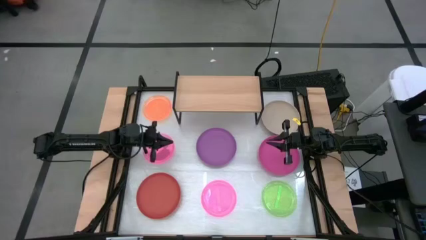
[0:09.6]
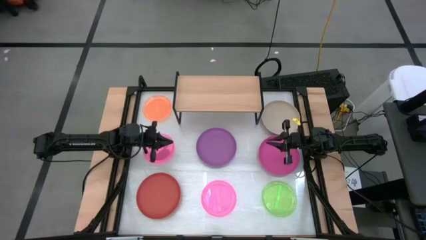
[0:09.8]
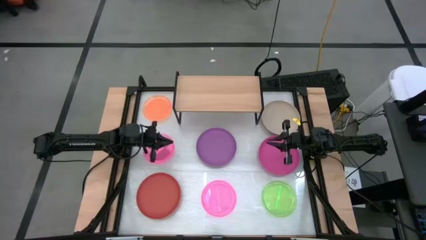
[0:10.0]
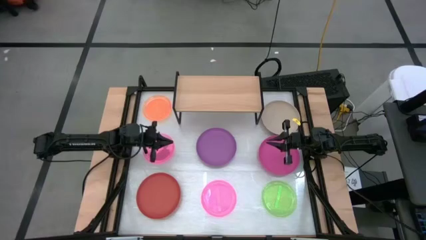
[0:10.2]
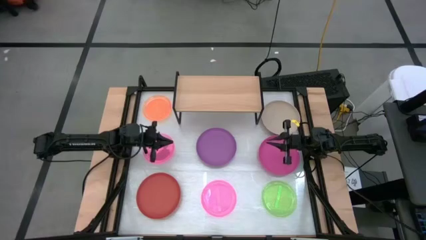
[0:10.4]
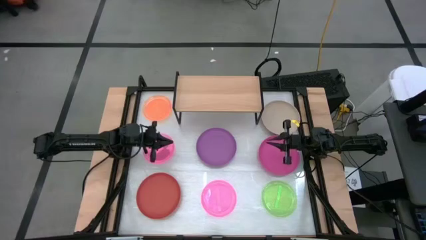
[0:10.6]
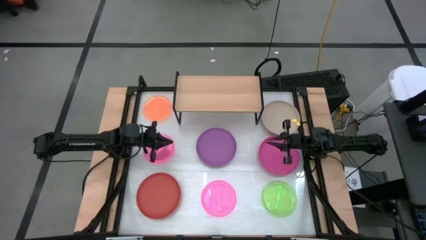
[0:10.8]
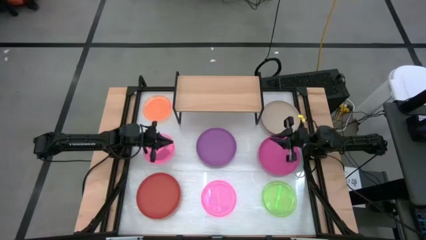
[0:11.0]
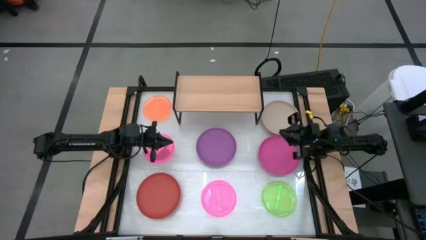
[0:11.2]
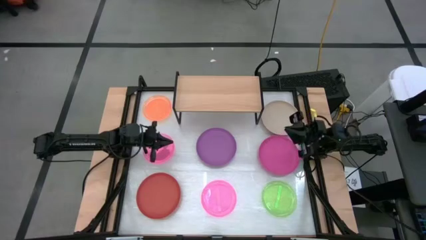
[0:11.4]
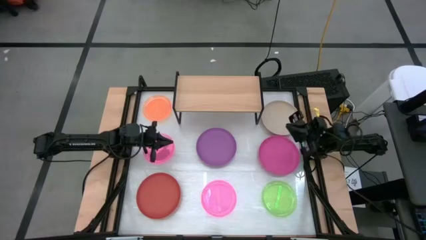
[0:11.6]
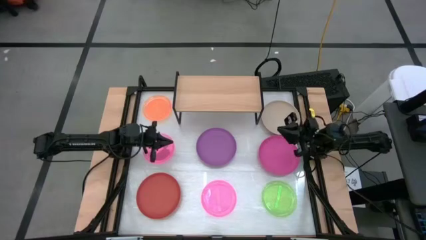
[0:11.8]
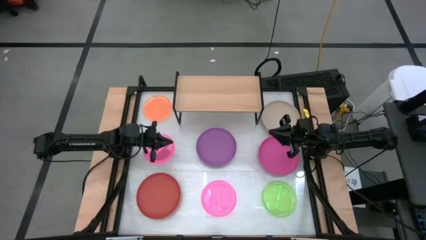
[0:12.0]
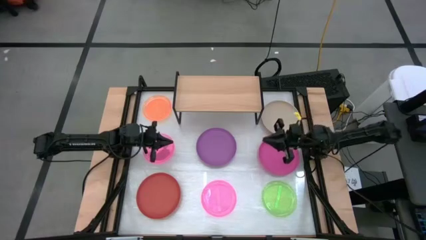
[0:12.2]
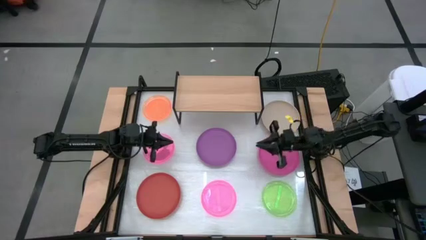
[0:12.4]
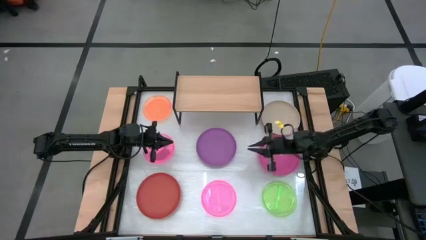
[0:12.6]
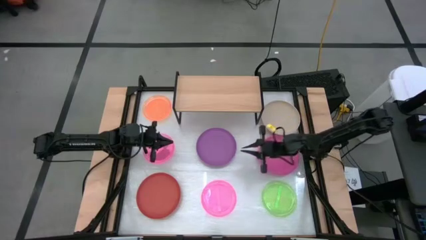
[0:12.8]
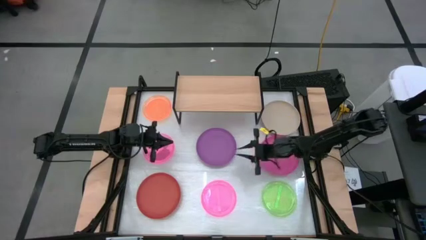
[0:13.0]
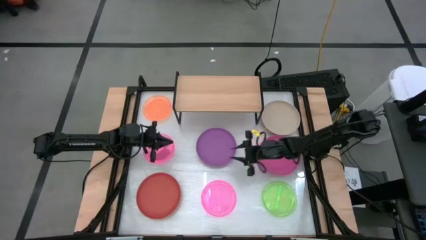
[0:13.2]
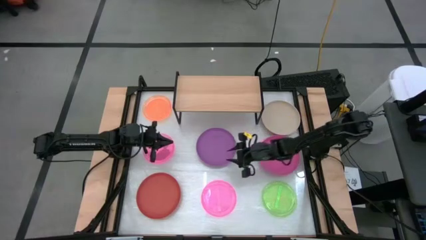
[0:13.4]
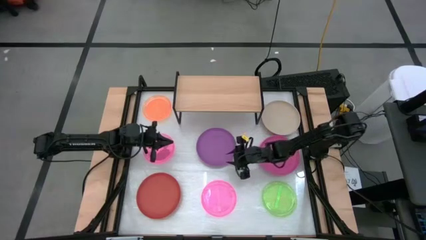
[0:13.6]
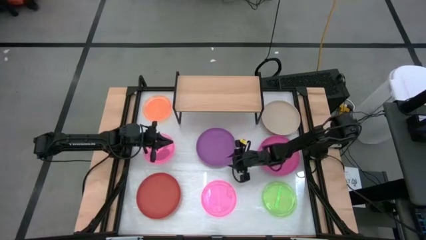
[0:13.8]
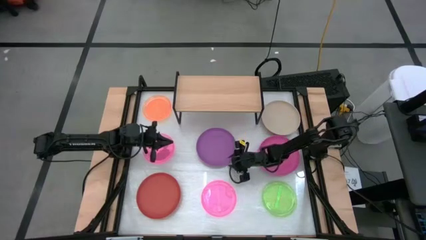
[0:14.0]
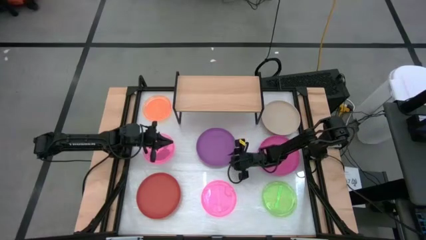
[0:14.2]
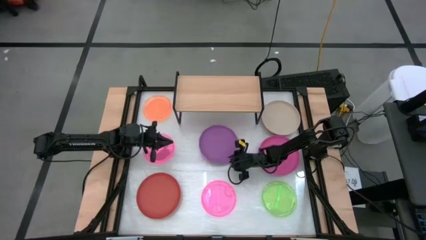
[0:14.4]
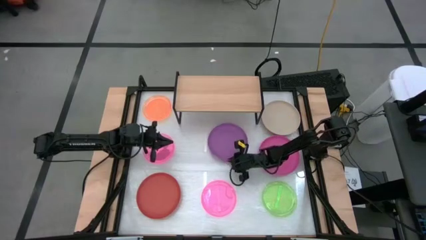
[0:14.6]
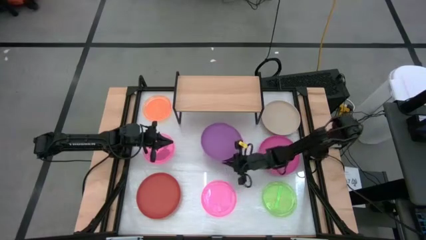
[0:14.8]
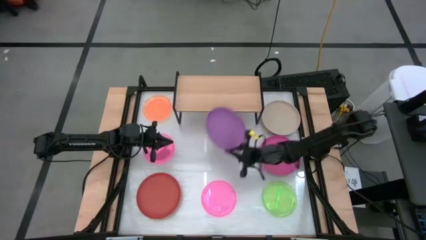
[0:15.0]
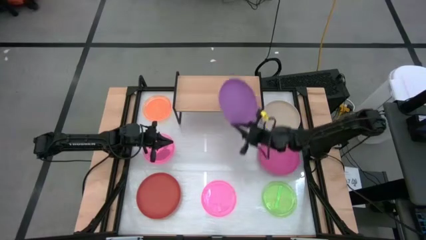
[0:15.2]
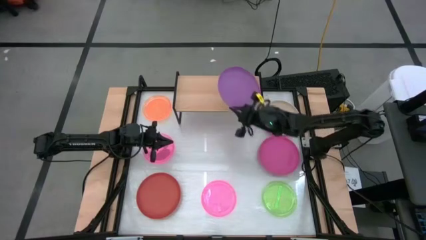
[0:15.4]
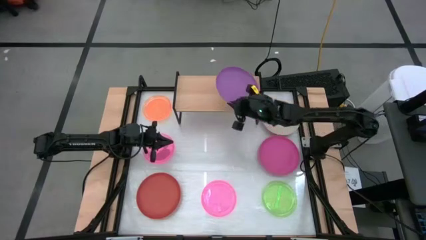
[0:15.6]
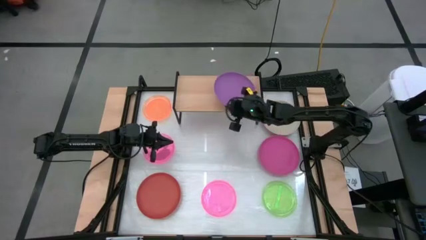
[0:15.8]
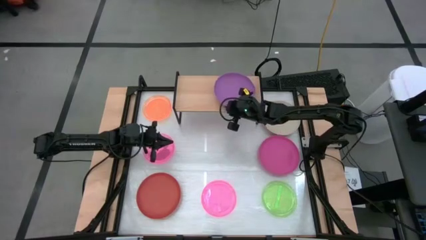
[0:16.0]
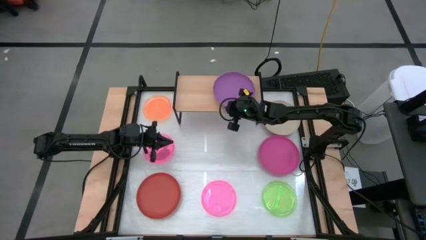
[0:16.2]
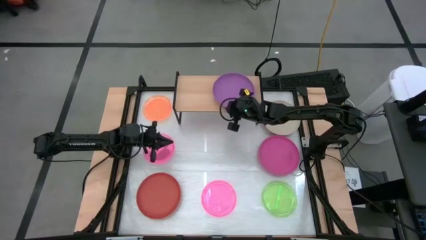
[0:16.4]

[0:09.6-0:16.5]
Task: Place and stack plates onto a shelf
Put the violet plate on the shelf

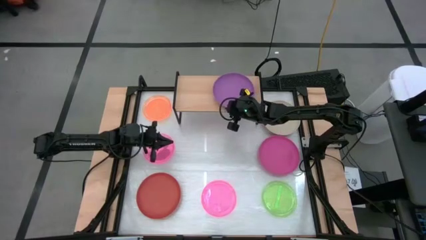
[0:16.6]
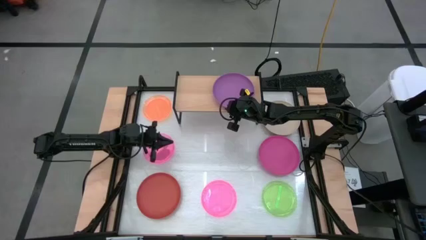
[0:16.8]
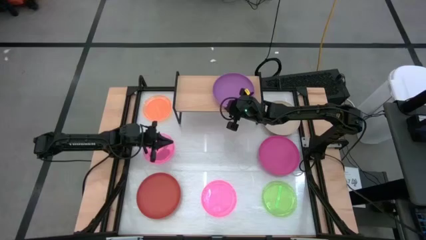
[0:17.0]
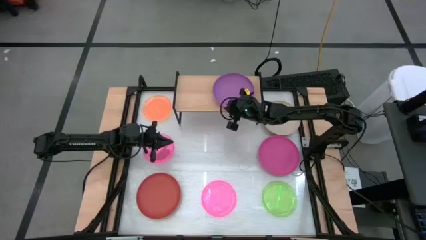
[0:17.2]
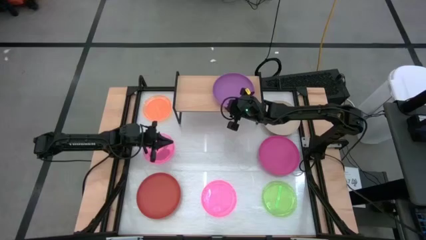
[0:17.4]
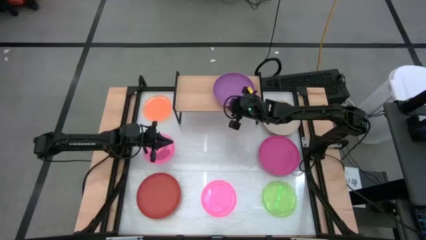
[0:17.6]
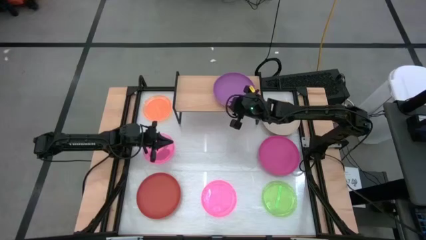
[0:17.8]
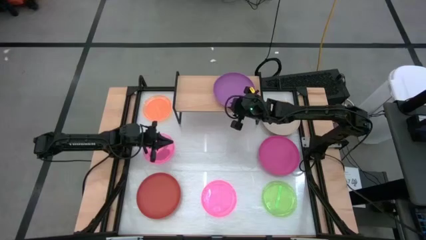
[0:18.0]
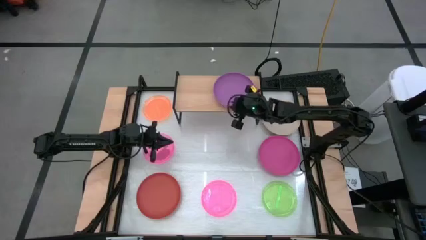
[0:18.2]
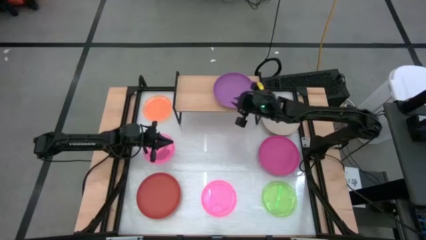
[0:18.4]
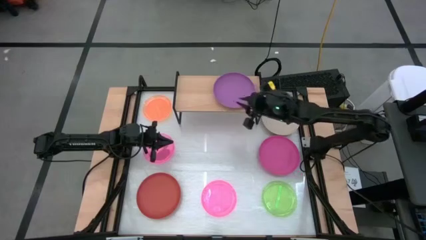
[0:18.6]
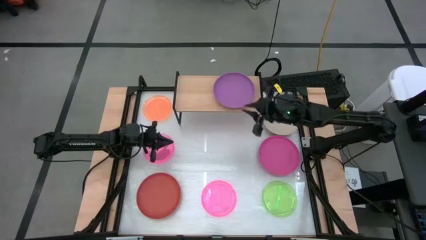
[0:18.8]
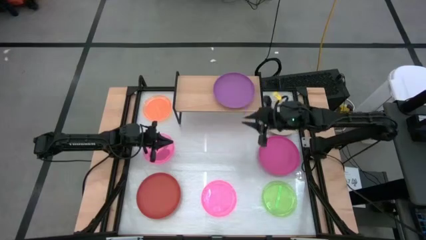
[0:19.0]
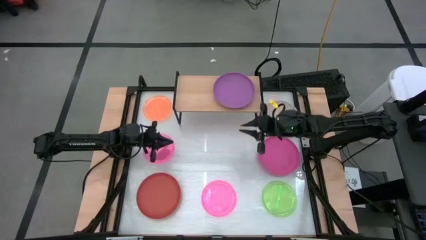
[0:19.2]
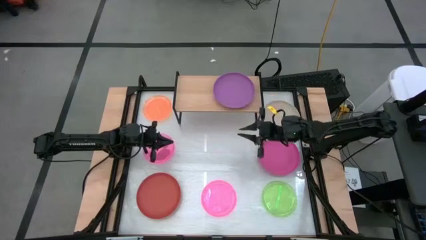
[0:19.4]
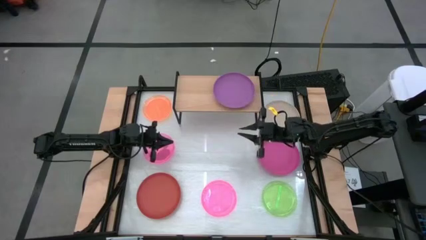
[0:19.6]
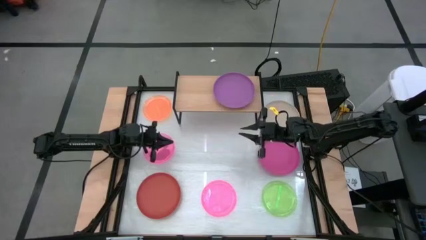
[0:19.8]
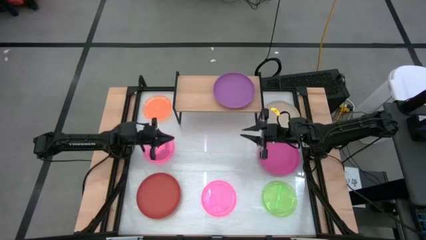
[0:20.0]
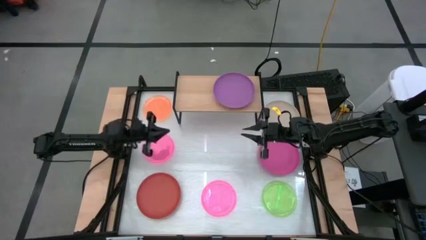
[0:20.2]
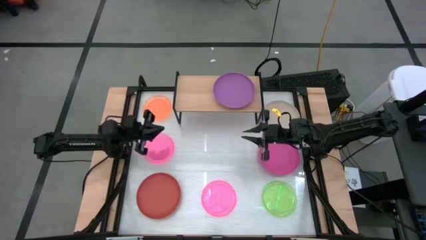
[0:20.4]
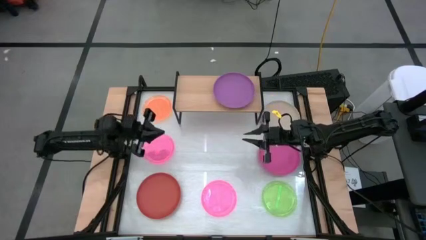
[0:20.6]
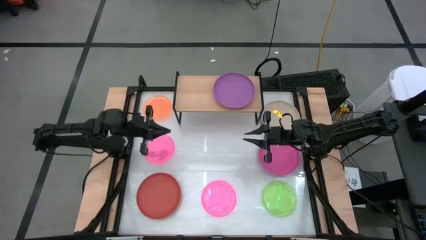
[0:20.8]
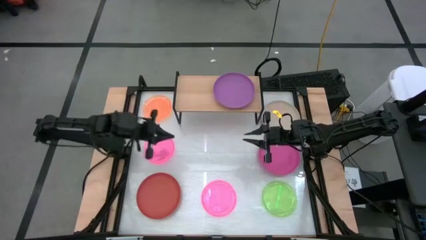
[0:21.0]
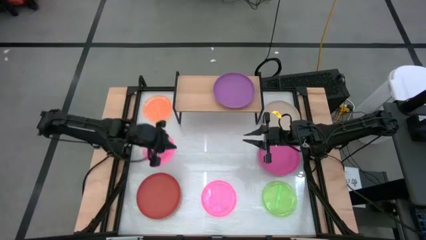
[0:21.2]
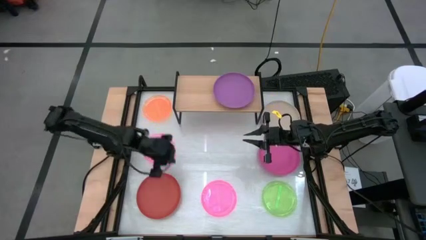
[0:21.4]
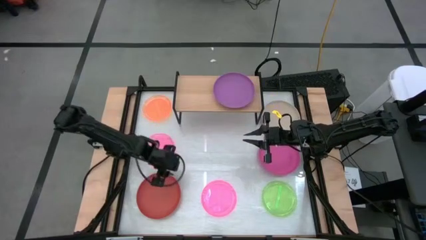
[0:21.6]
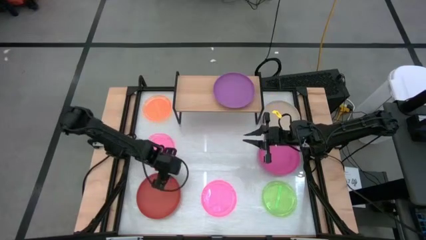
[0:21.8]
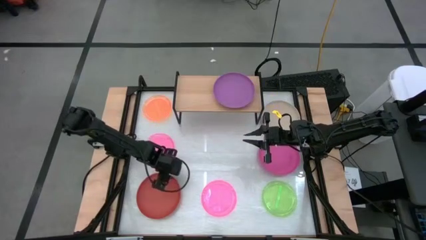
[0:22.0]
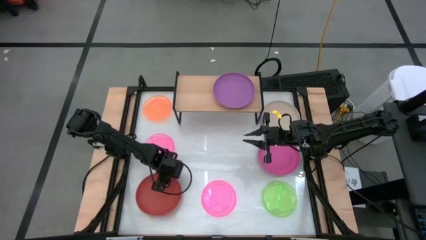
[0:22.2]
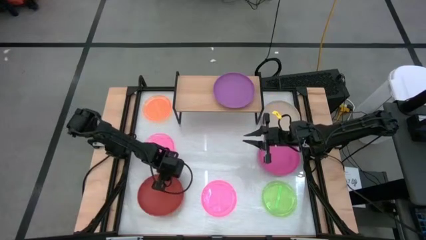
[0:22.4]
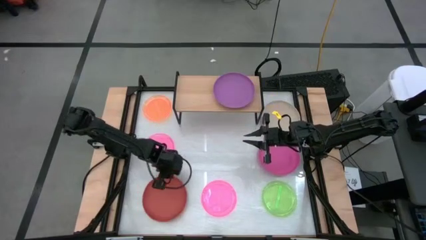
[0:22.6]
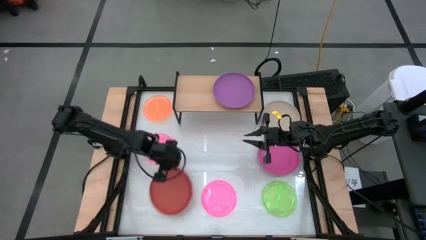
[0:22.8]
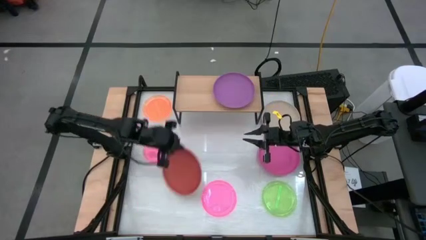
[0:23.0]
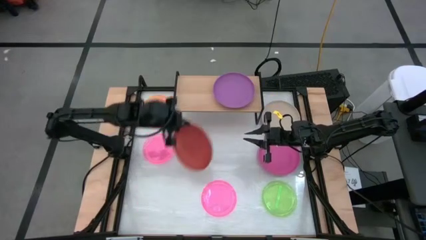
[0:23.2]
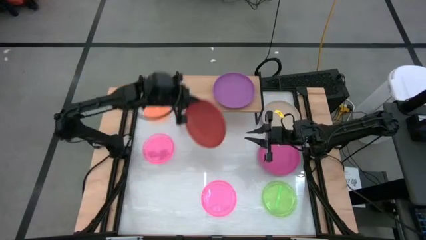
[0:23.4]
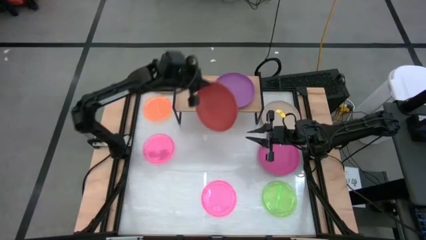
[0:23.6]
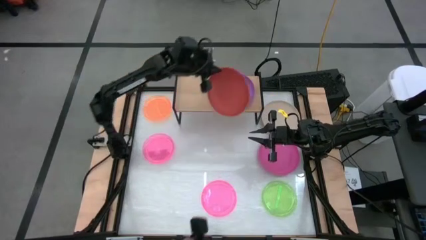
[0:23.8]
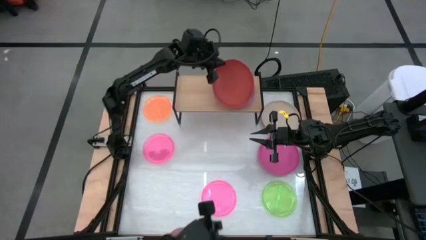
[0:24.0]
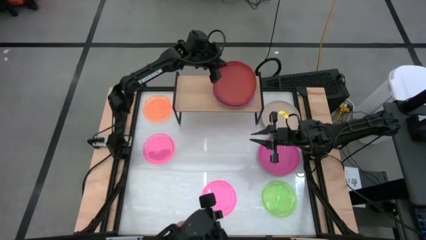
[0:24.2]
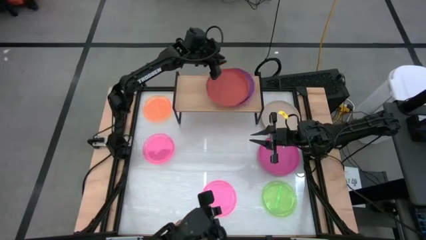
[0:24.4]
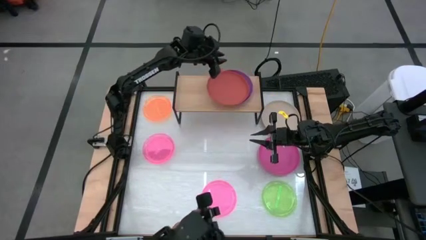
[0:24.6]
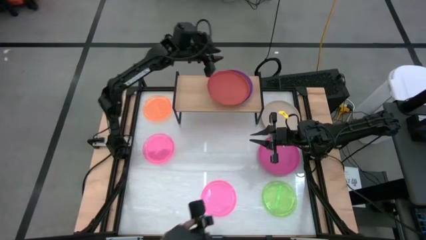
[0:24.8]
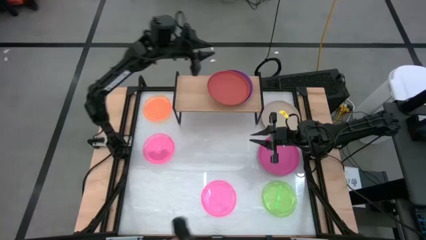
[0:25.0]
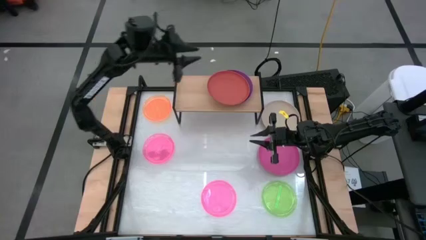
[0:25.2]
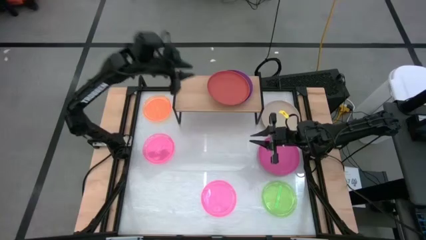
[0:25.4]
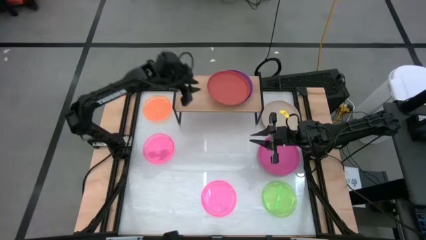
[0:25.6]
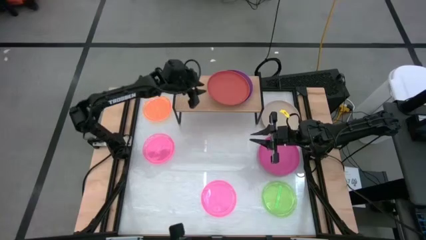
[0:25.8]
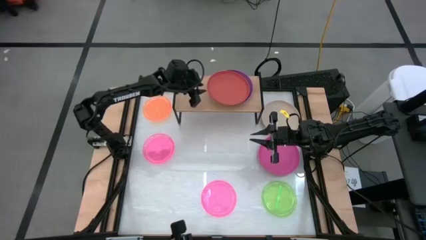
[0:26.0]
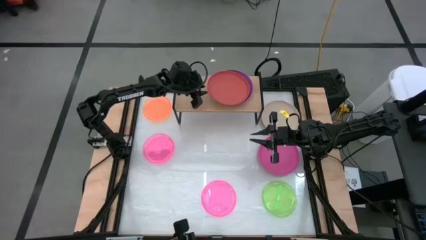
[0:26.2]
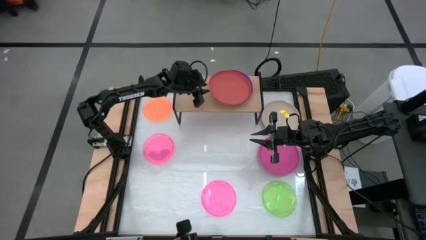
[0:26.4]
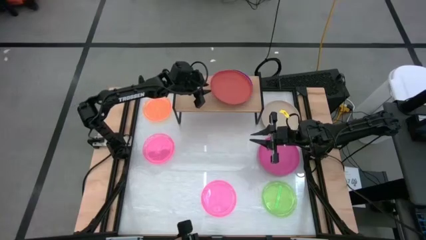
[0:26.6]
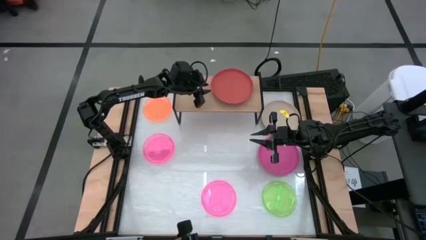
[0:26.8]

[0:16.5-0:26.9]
Stack the orange plate on top of the violet plate on the shelf
